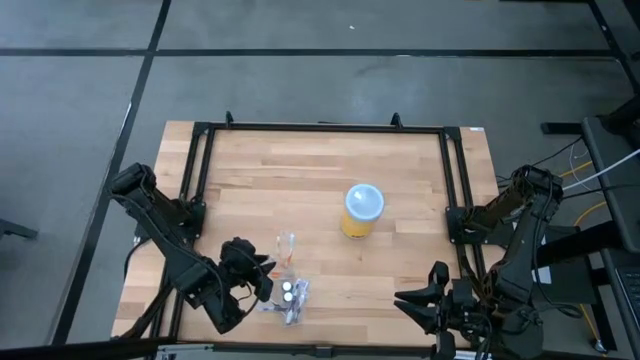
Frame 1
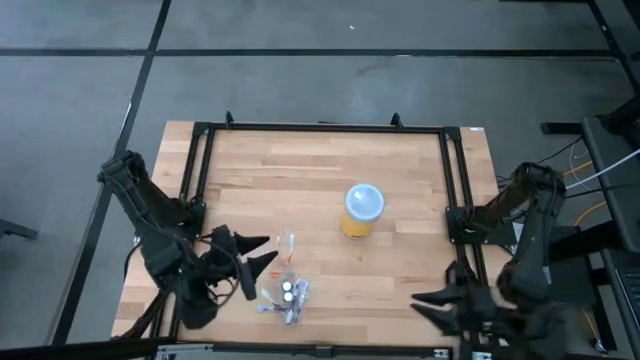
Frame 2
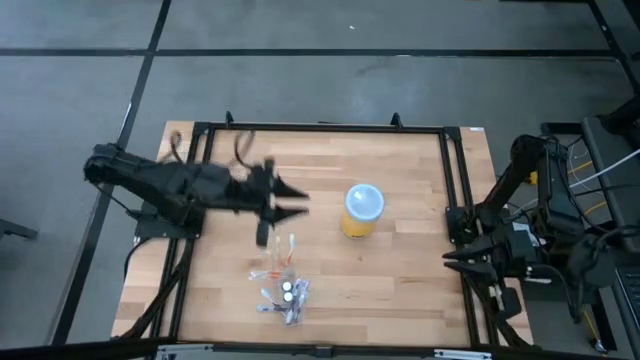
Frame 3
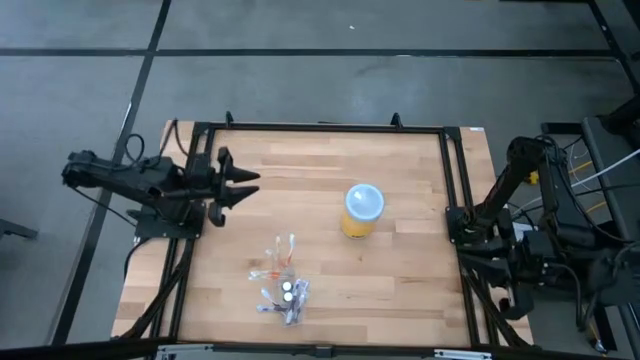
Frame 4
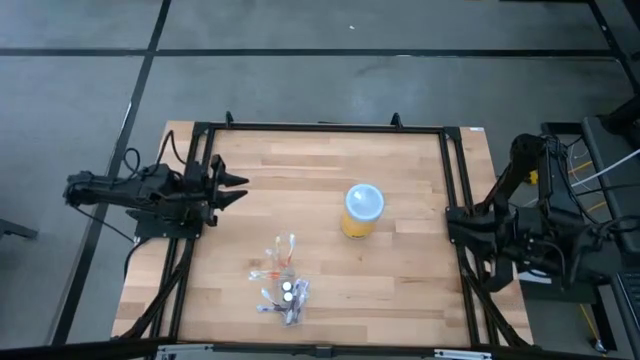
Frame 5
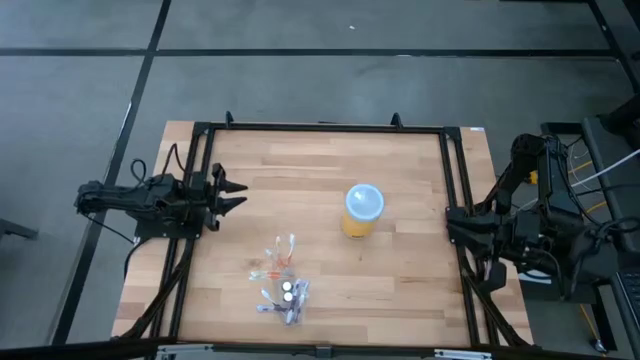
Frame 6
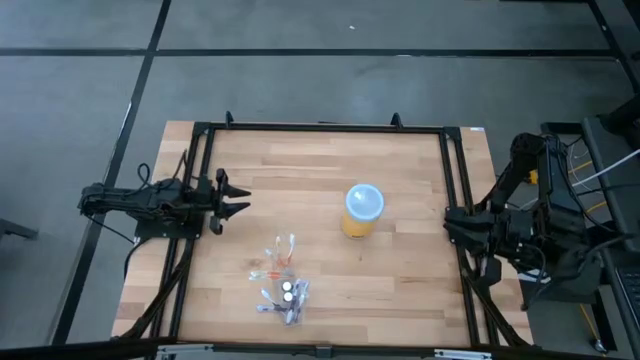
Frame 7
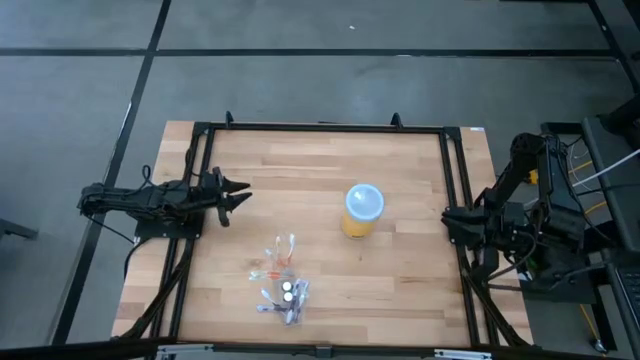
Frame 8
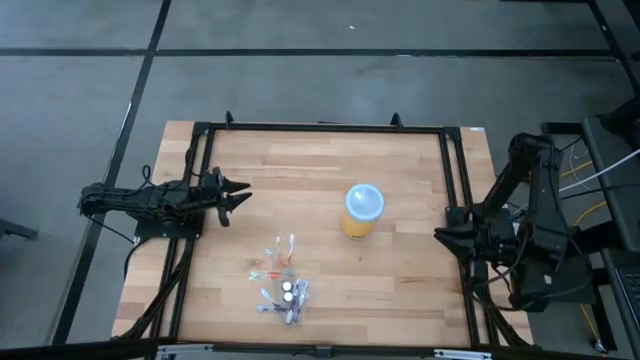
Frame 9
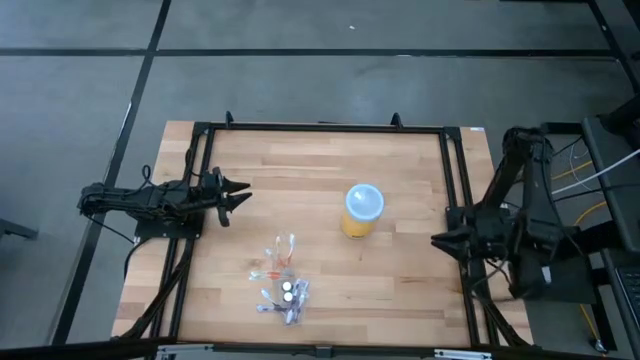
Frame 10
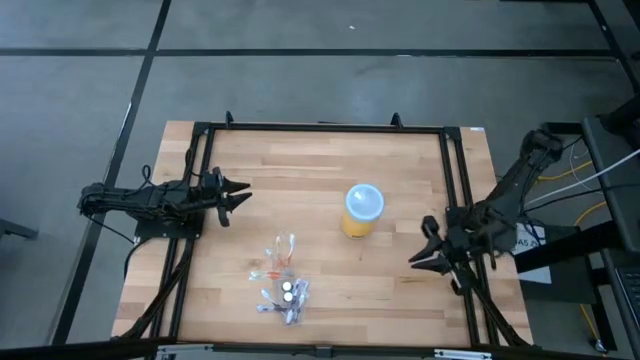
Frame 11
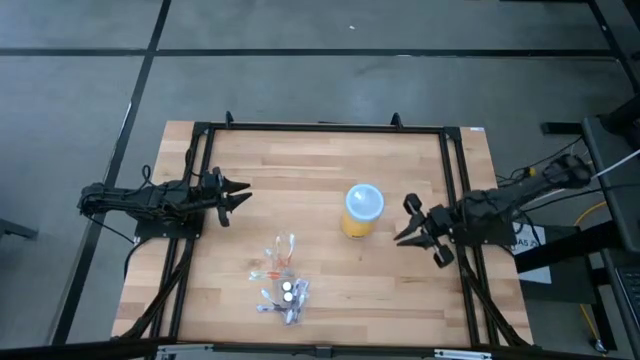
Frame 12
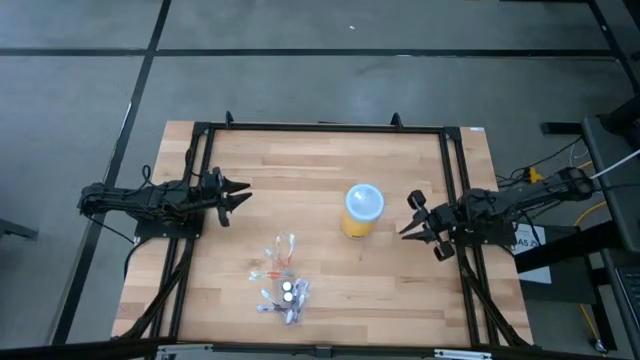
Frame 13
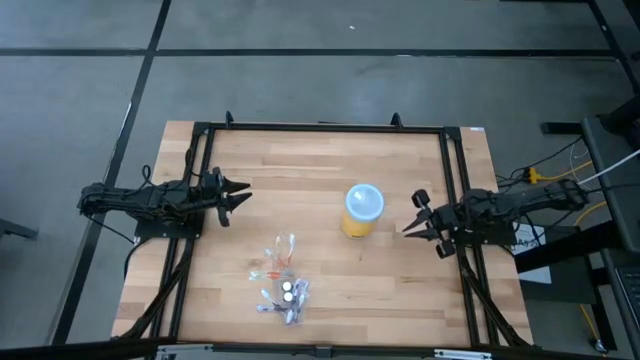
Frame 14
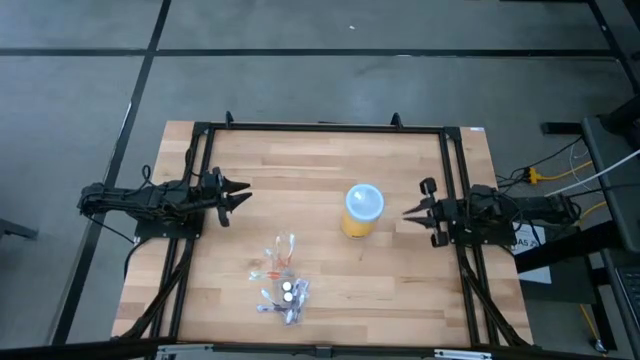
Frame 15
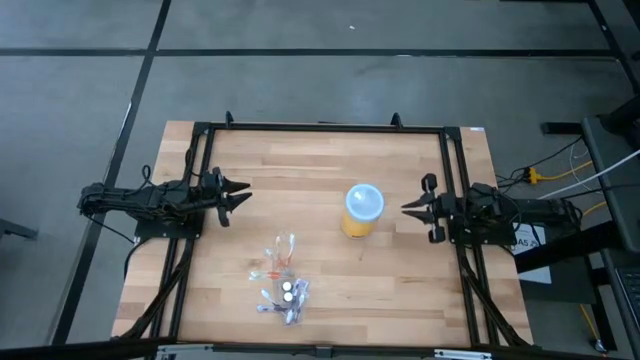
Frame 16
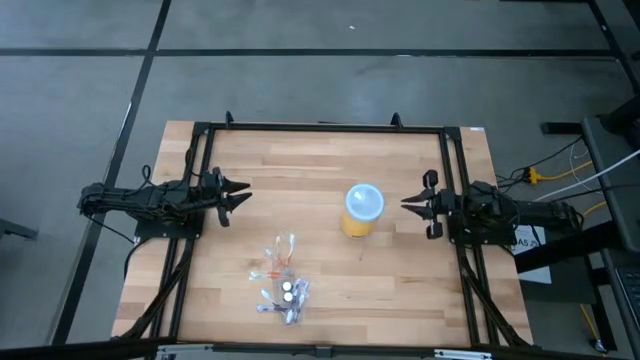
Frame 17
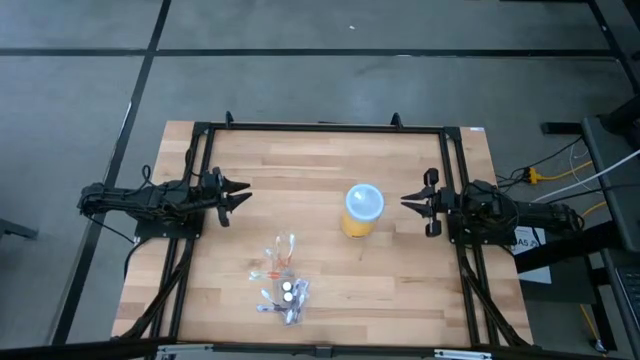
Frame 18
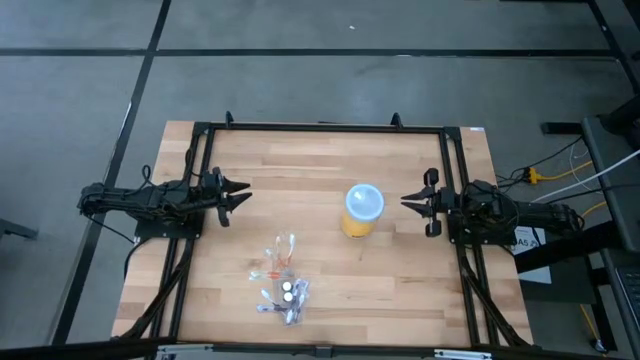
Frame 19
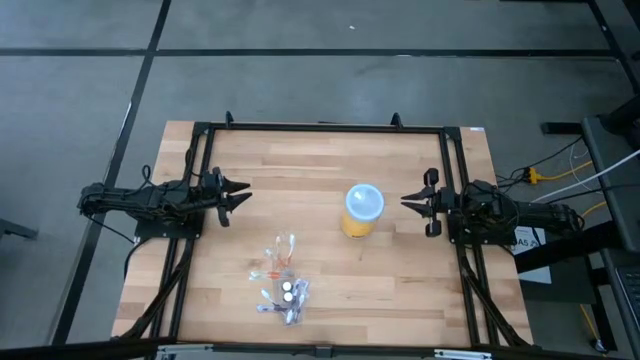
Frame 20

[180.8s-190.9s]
Task: Pick & Place toothbrushing station
Return to Home Position

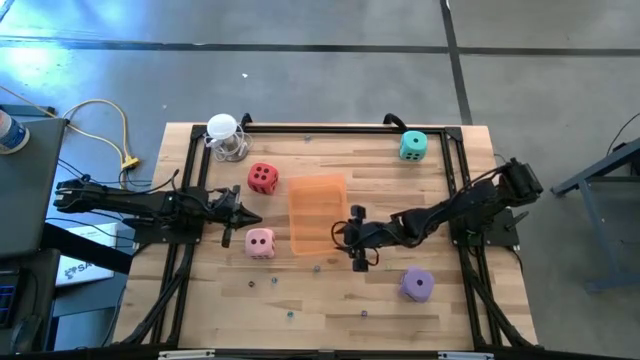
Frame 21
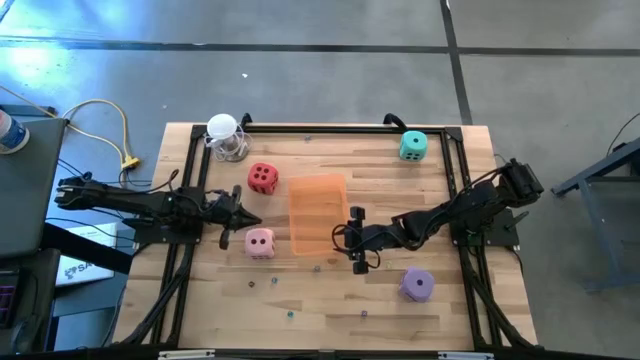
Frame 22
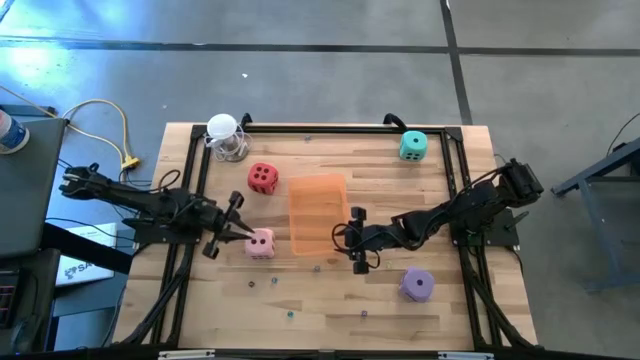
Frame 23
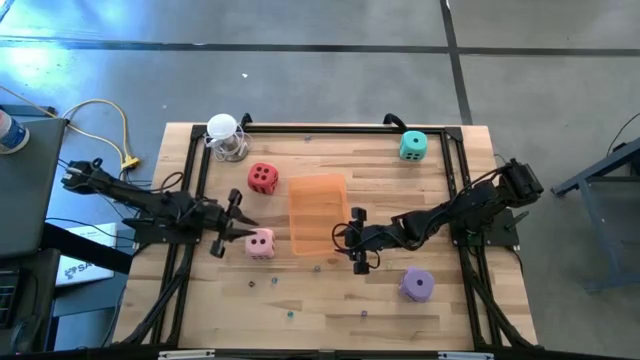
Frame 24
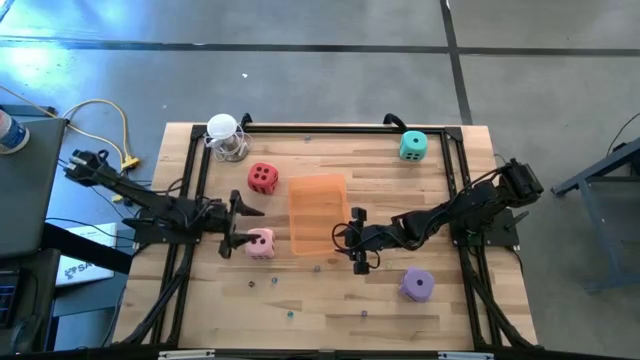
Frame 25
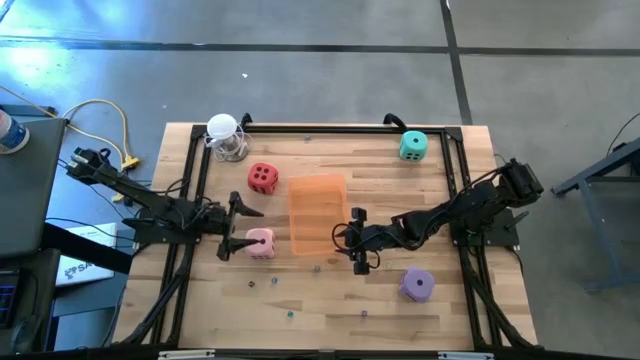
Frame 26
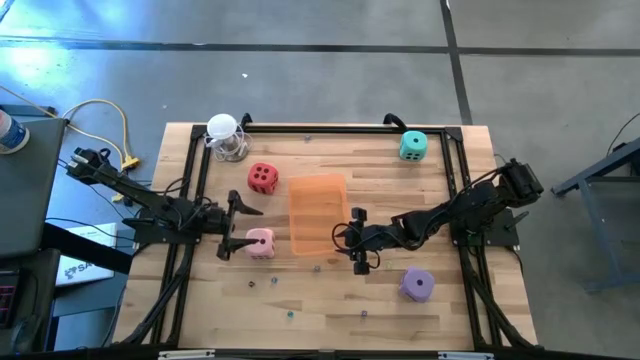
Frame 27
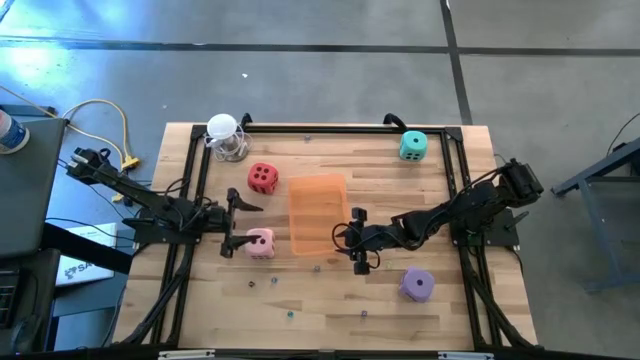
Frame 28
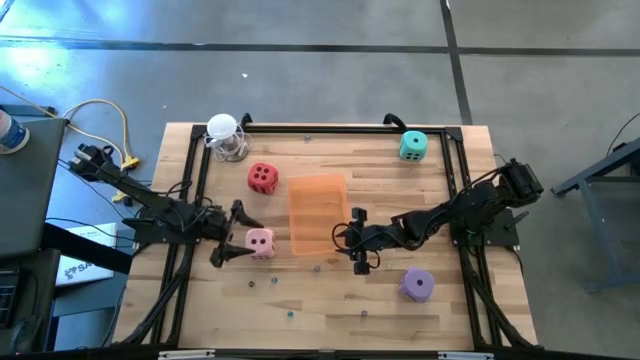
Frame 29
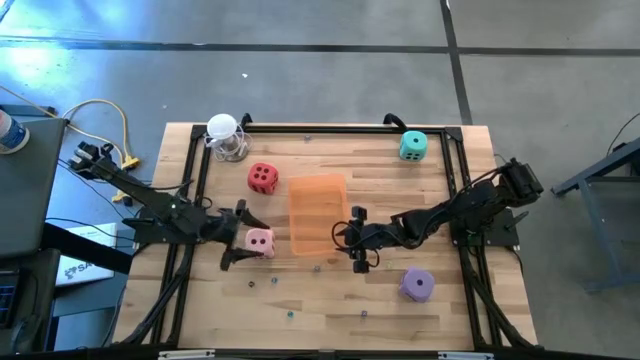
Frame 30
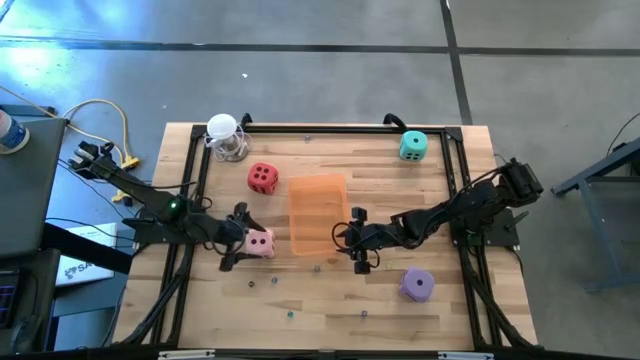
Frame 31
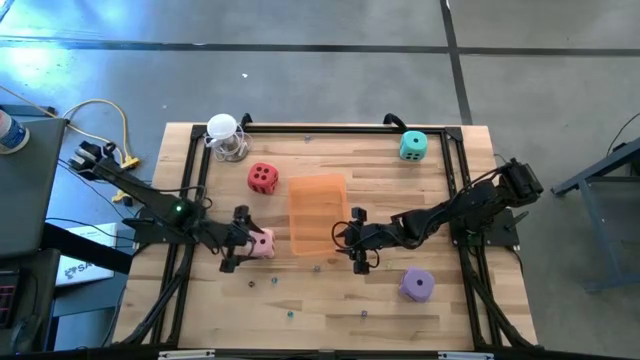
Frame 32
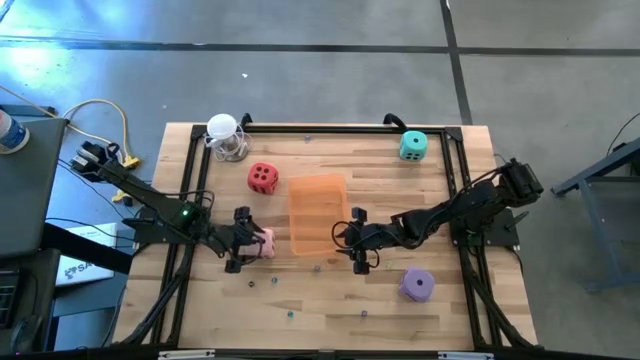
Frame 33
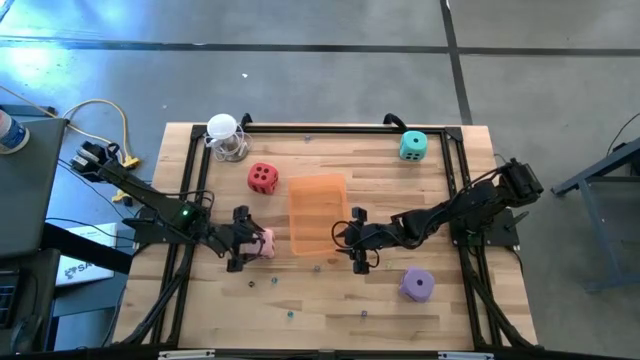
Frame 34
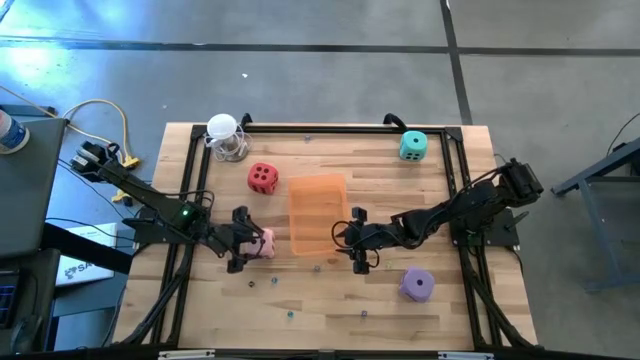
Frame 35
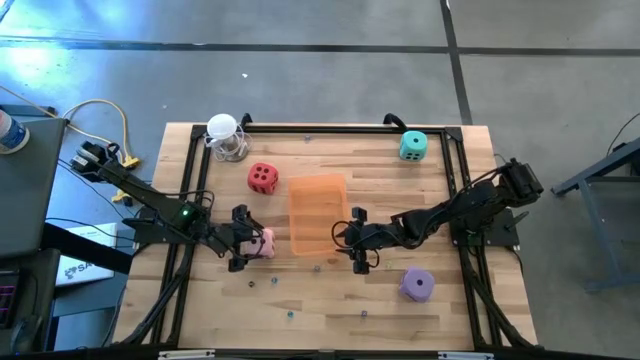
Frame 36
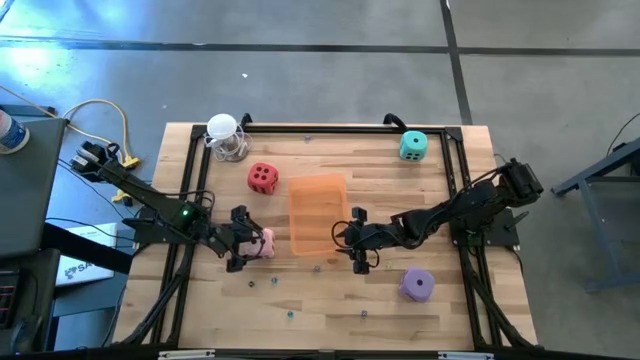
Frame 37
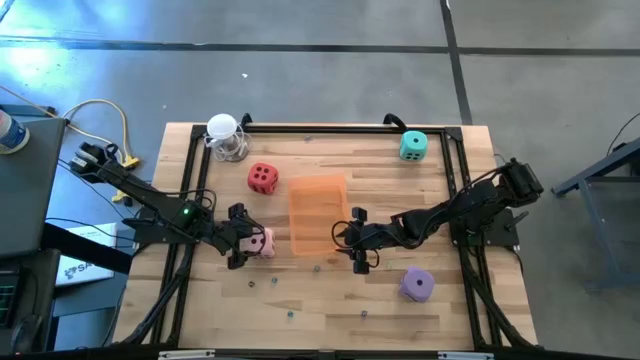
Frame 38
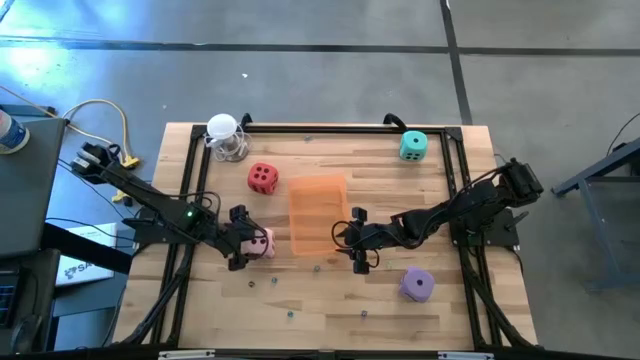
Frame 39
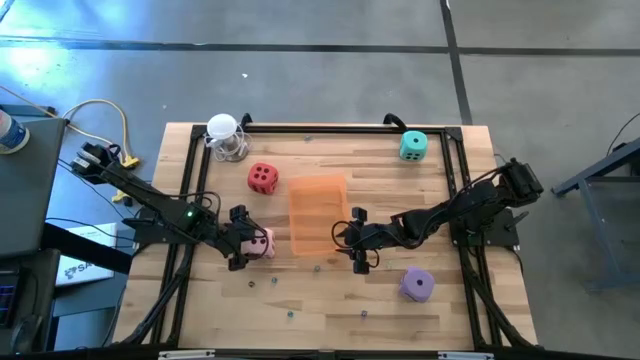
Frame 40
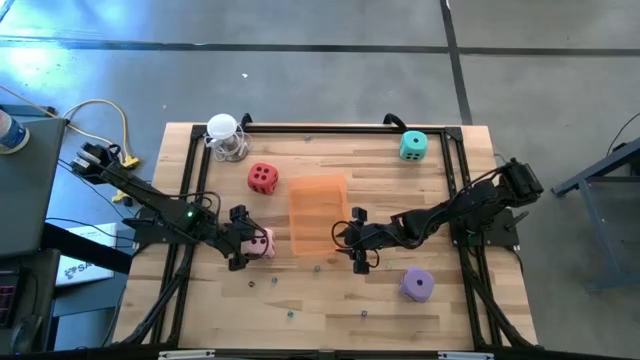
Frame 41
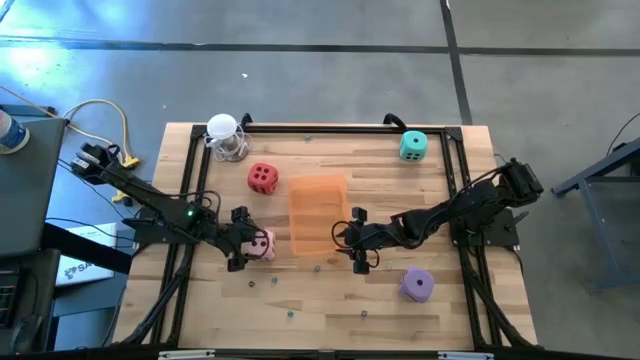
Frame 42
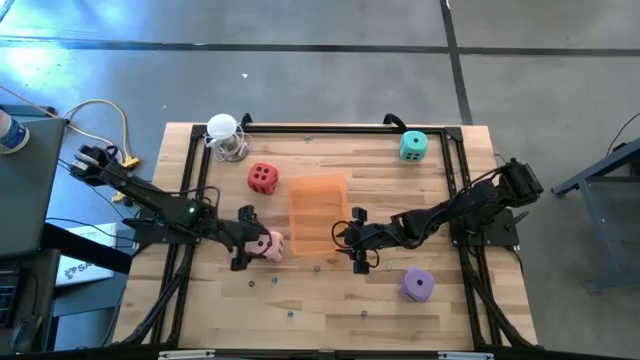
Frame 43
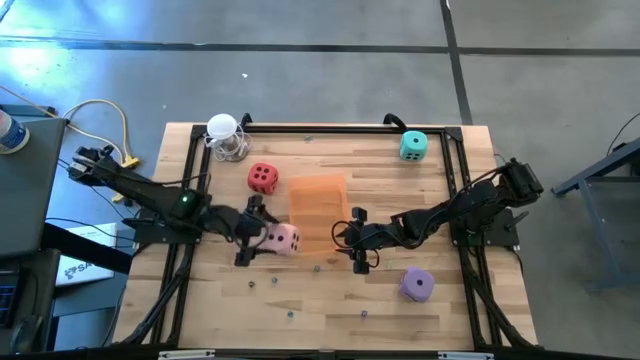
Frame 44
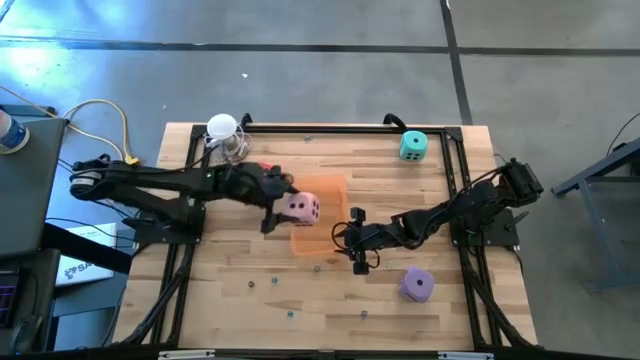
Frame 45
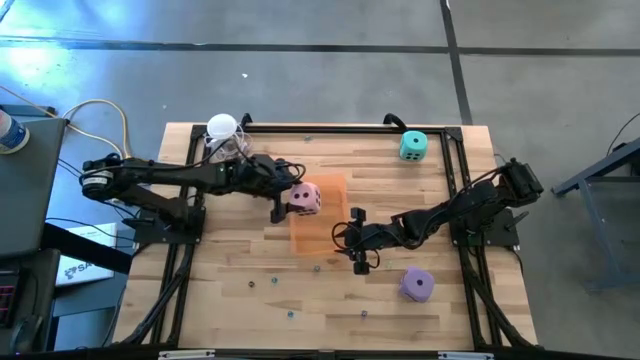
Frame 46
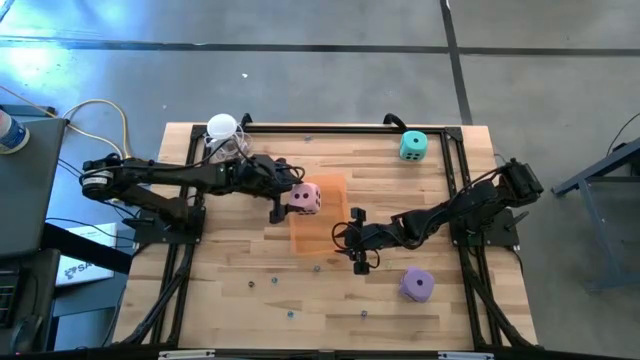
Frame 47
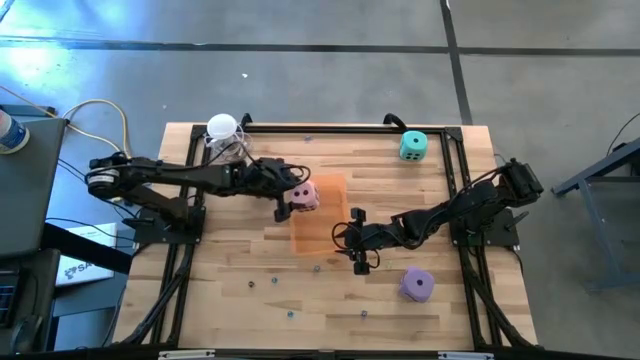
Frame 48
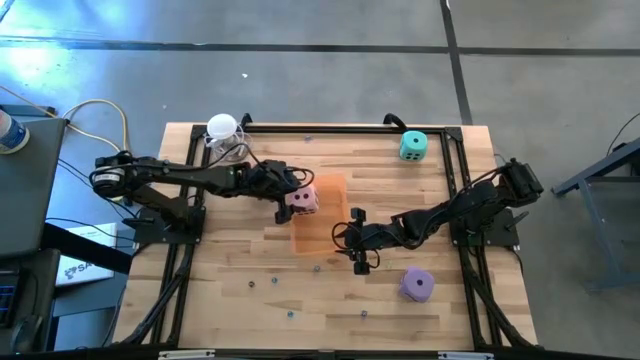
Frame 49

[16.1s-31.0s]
Task: Pick & Place Dice
Put the large pink die into the orange bin
